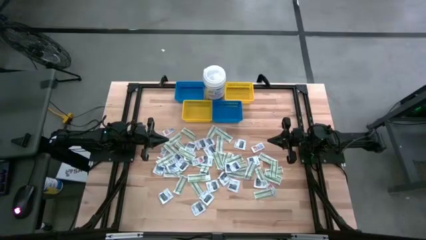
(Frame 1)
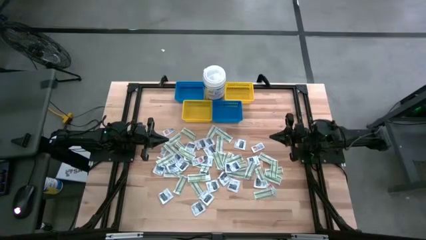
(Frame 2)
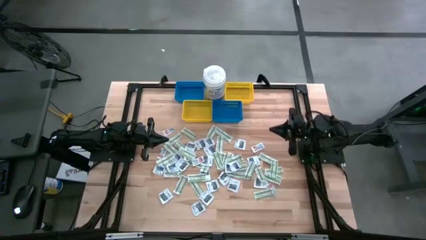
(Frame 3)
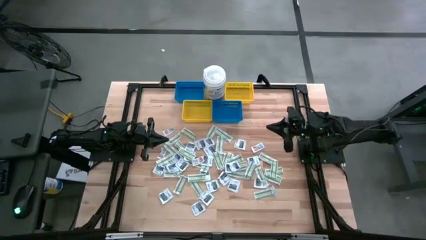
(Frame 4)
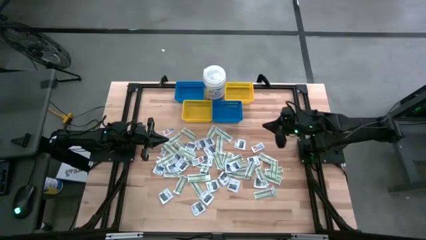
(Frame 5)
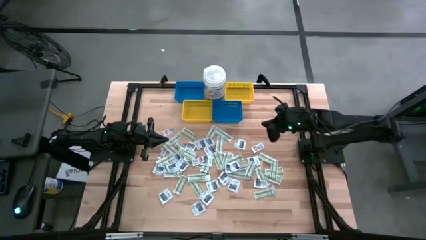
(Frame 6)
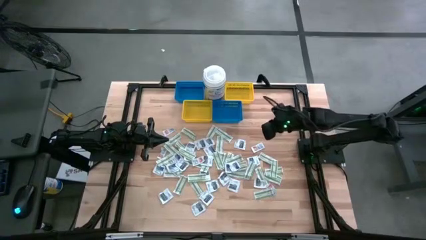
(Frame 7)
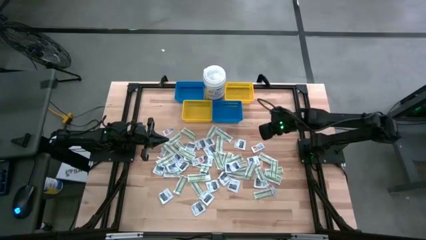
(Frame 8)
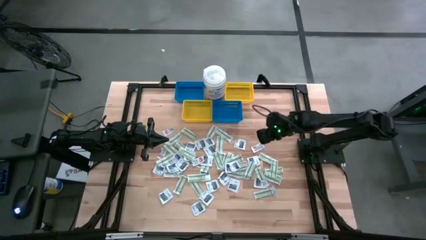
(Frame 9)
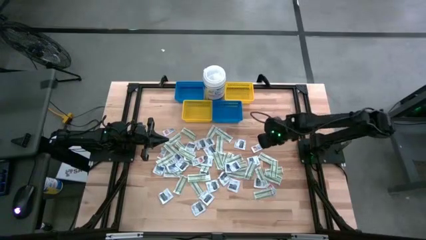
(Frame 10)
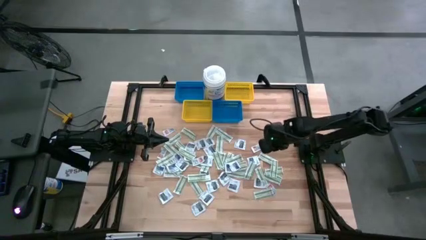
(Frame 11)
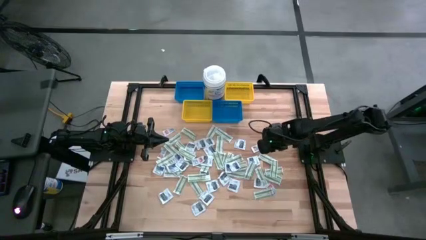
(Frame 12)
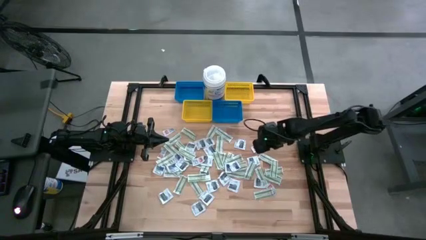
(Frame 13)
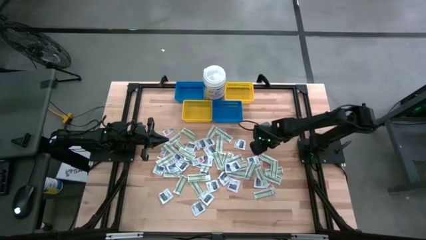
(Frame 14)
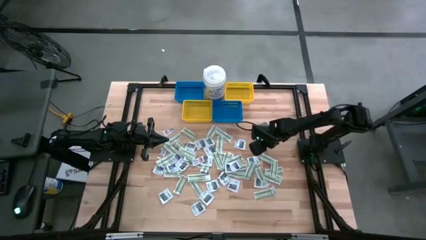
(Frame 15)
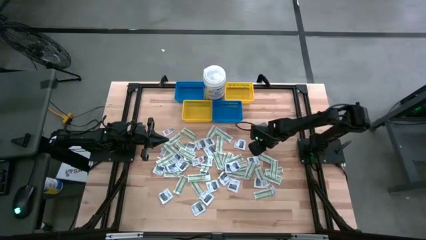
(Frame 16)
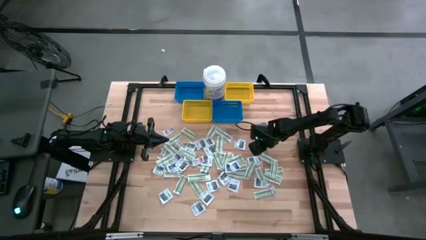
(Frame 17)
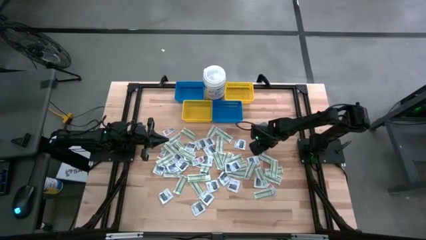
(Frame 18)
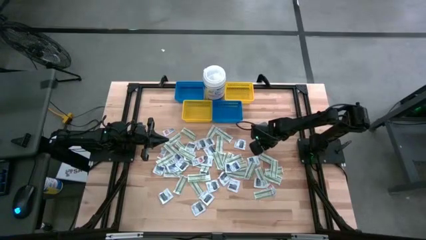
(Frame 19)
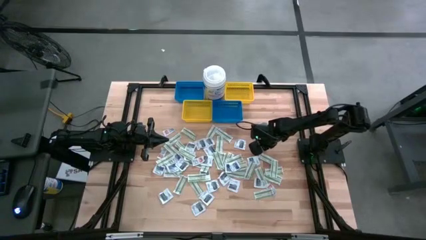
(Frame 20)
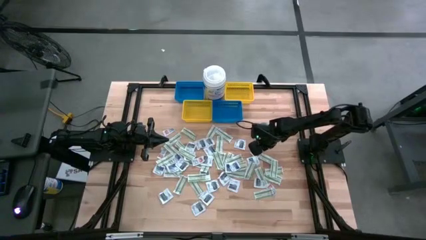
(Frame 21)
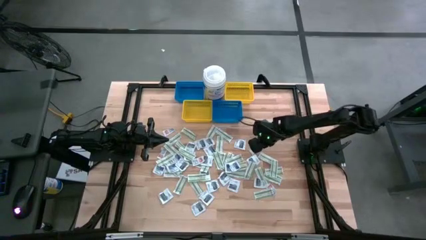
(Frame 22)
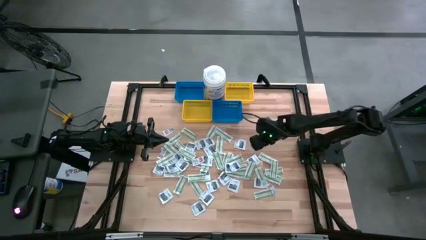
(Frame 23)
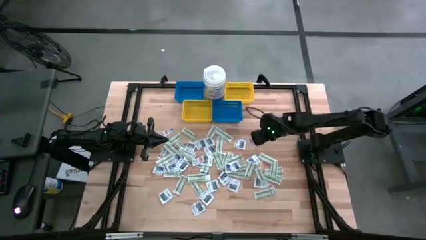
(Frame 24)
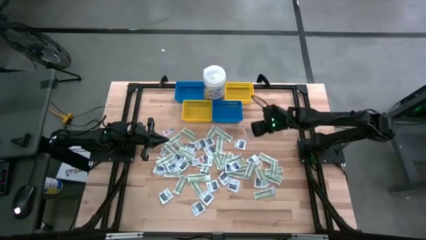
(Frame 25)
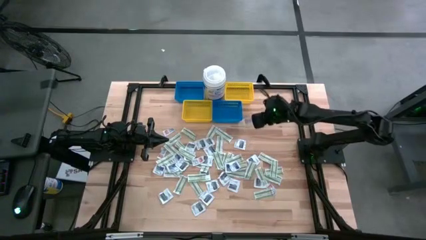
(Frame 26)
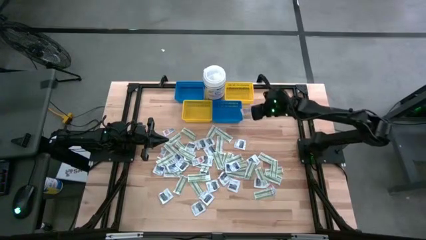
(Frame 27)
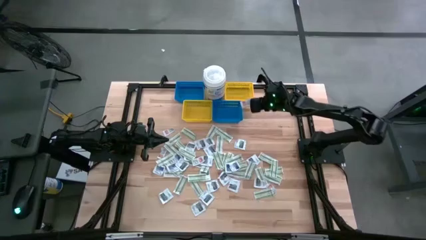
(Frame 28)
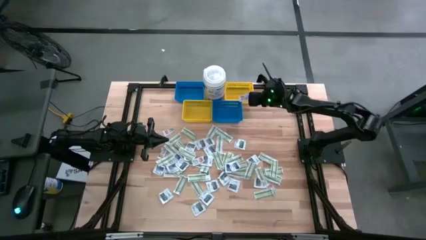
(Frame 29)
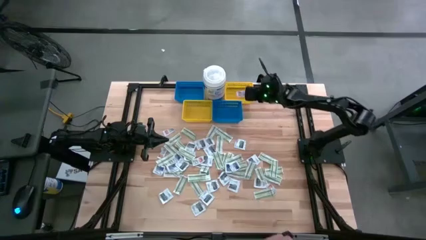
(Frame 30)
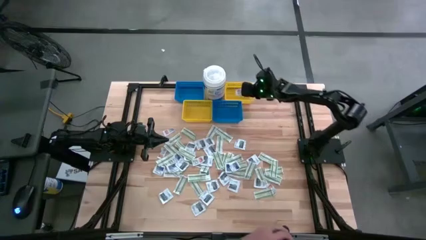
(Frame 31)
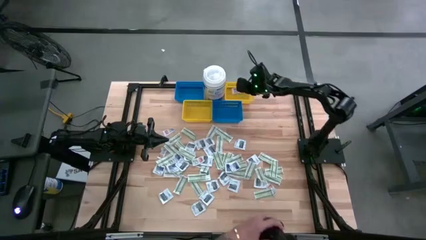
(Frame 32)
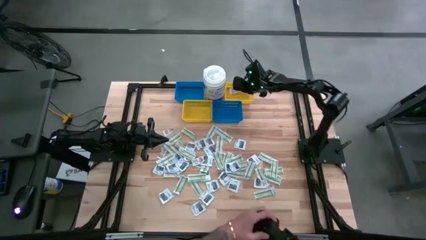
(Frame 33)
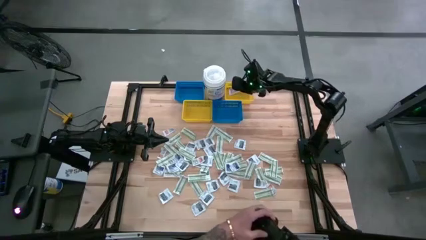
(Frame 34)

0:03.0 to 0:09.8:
Task: Pick & Place First Aid Supplies
Put the orange ointment pack into the right yellow bin

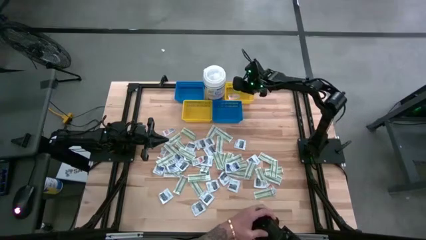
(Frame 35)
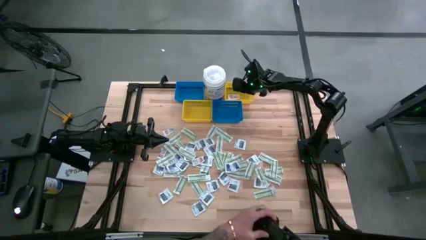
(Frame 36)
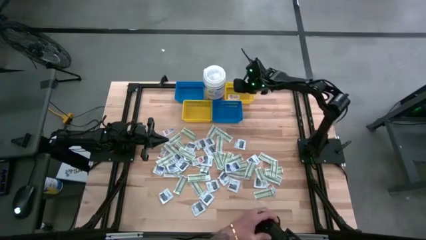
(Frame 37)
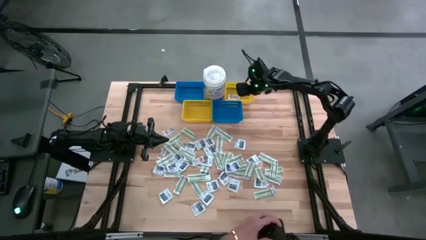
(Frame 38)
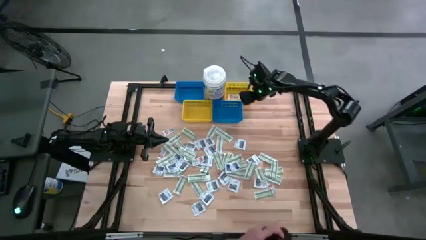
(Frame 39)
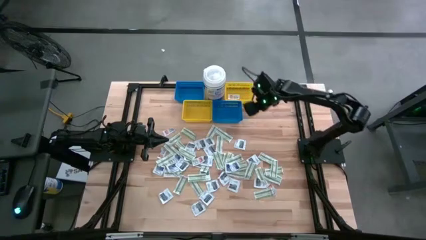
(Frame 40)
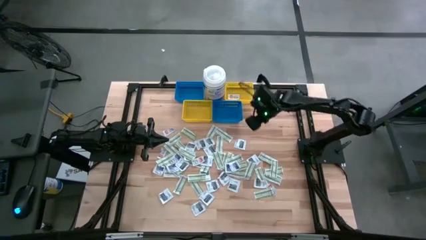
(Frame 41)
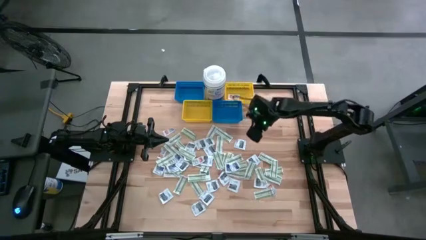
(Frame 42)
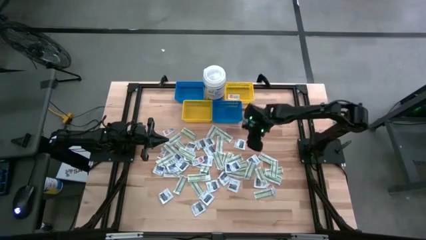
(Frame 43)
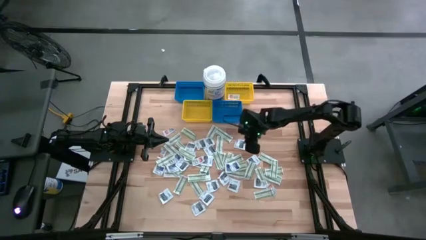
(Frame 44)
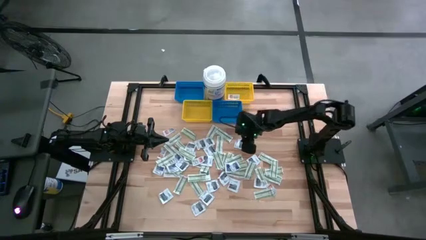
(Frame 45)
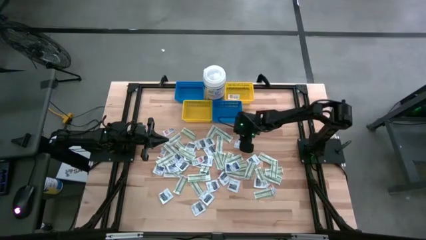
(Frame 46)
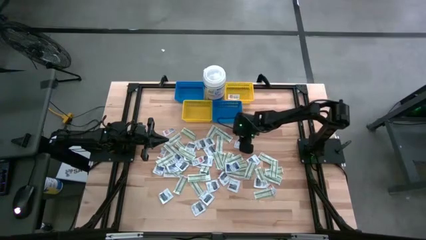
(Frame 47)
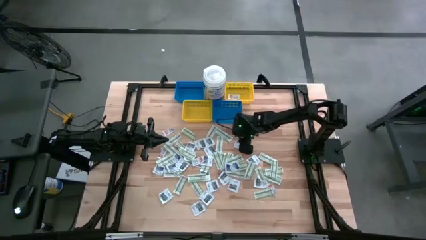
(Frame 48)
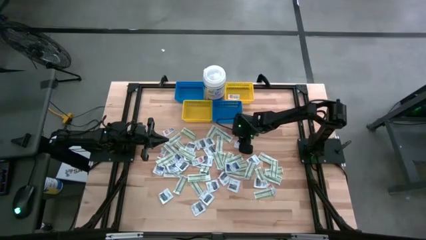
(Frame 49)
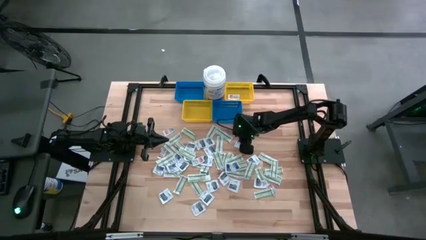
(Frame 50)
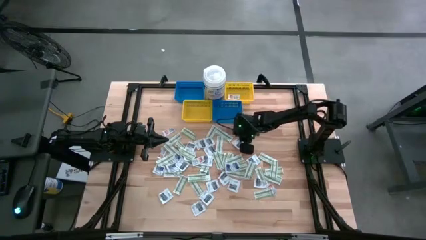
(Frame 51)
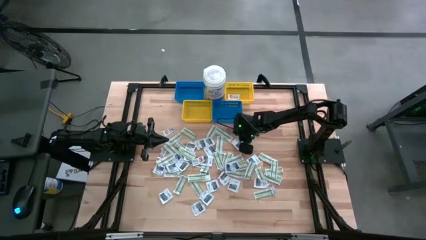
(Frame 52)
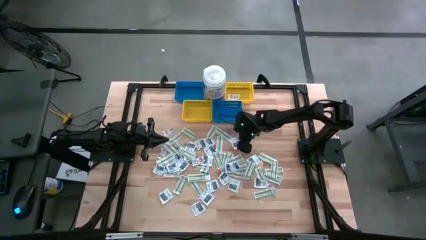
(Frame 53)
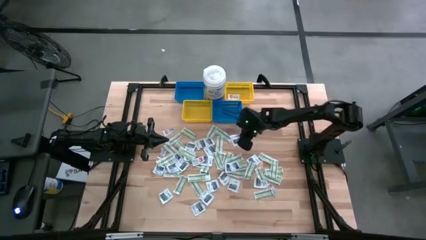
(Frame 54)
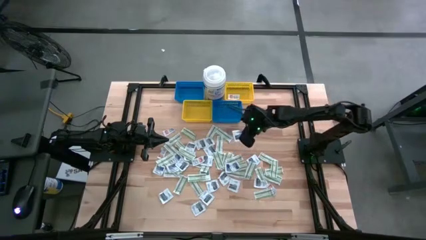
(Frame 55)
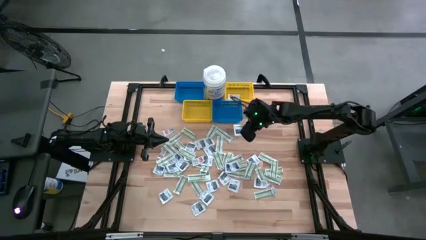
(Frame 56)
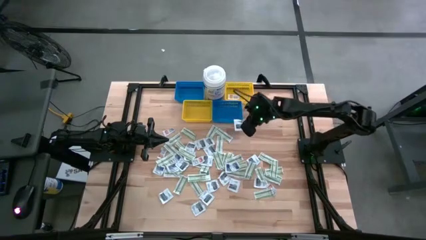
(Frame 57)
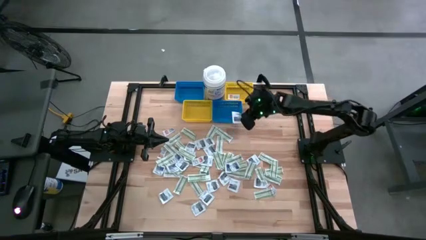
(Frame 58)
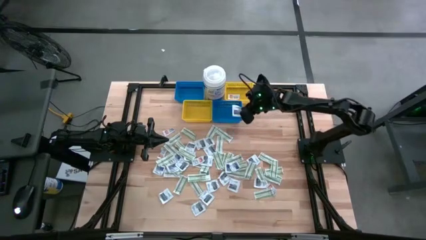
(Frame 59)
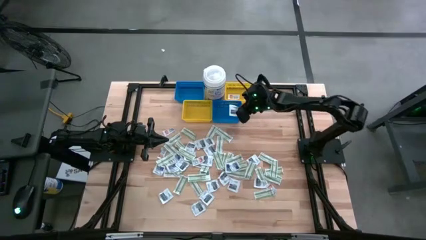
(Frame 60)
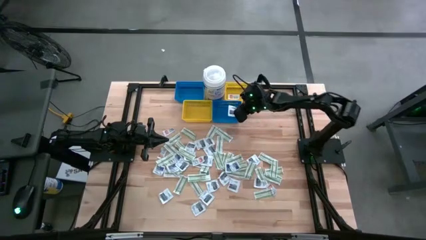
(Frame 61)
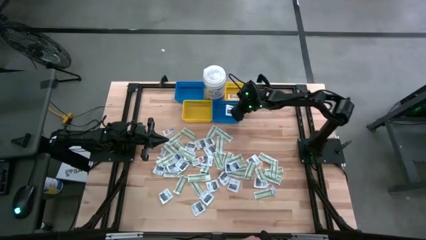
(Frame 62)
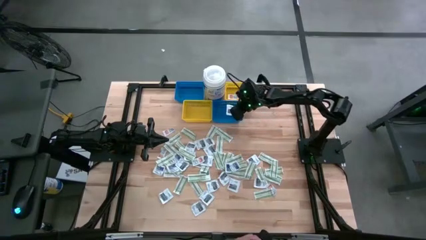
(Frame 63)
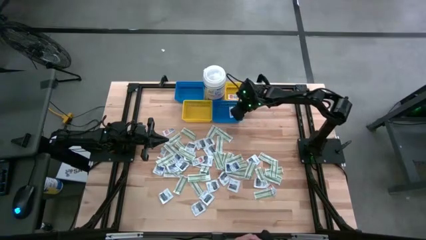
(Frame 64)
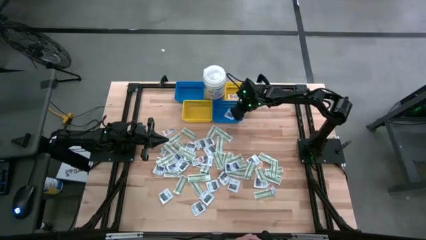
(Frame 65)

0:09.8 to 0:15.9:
Put the black towelette pack into the right blue bin

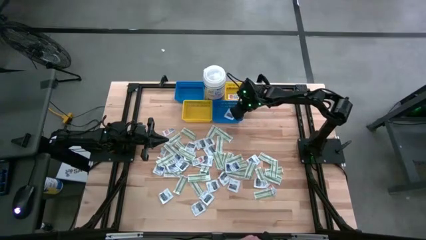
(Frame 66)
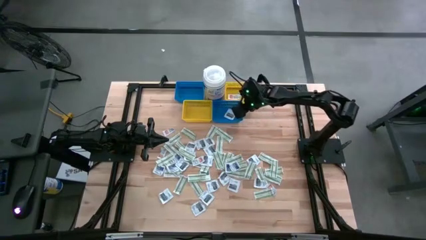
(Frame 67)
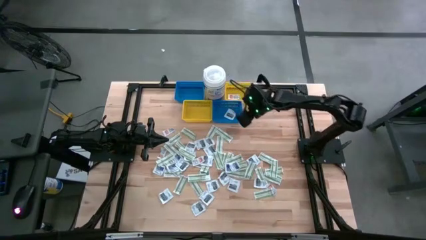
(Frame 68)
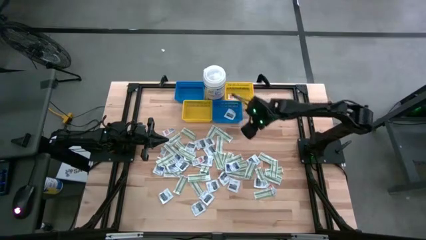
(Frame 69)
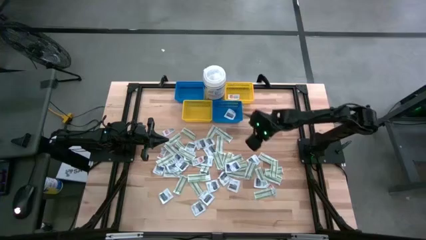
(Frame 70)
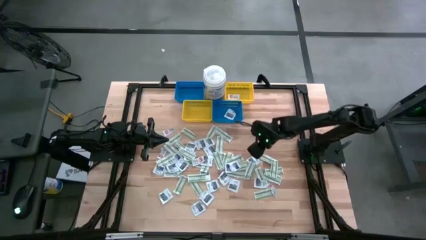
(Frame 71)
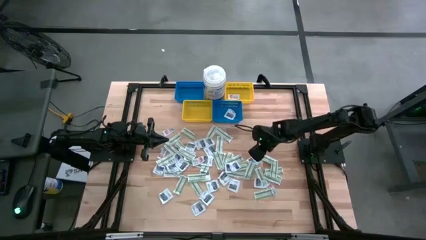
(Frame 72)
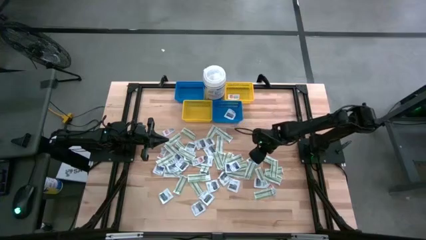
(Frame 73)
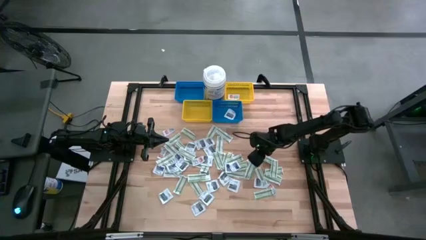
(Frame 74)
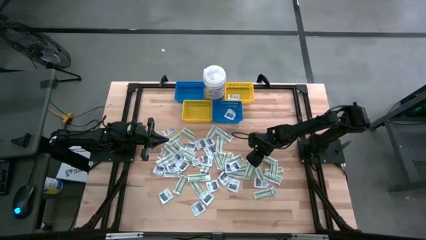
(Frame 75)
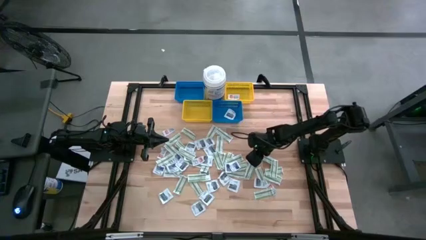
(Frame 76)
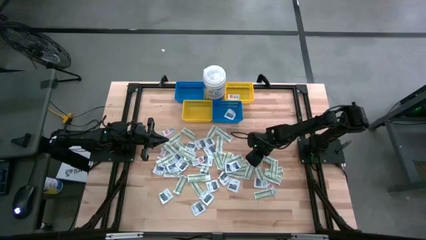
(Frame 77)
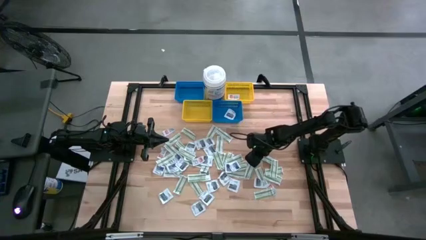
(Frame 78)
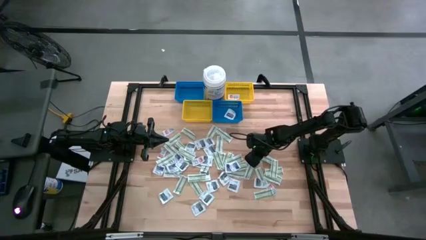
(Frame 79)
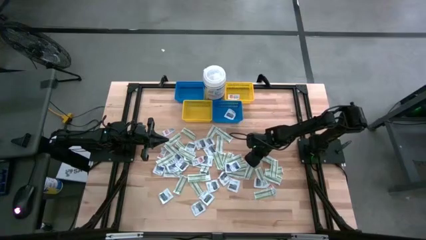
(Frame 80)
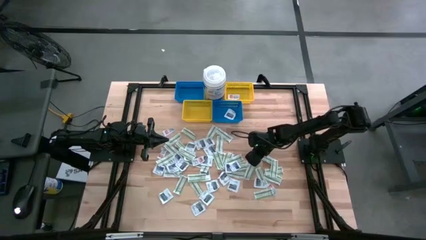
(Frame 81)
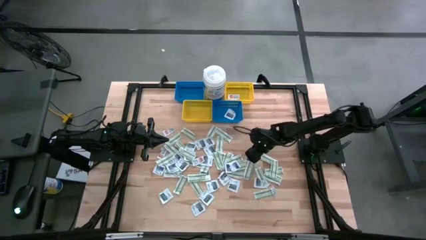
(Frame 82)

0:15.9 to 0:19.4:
Put the black towelette pack into the right blue bin
